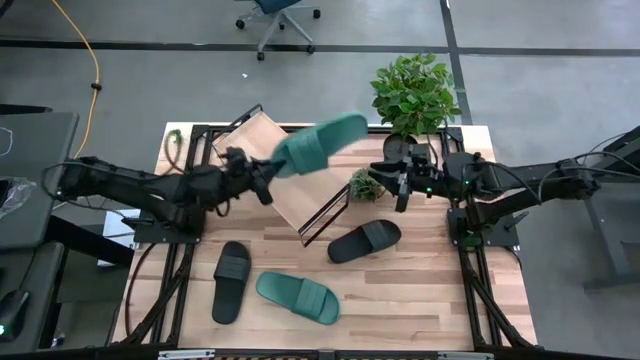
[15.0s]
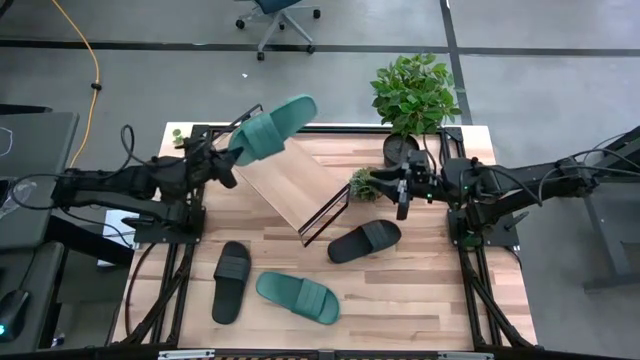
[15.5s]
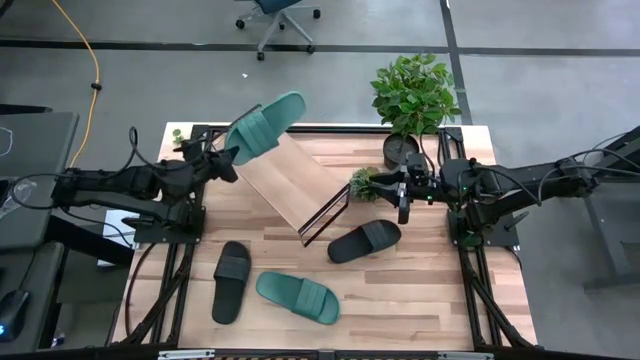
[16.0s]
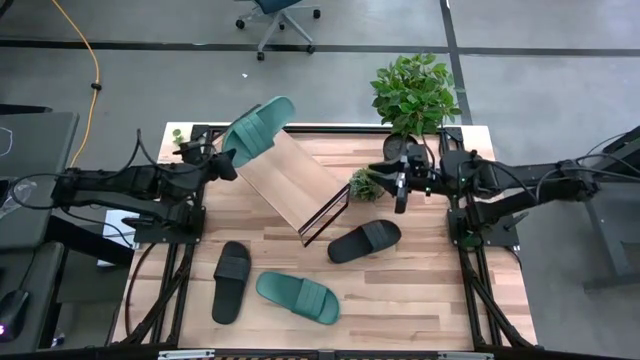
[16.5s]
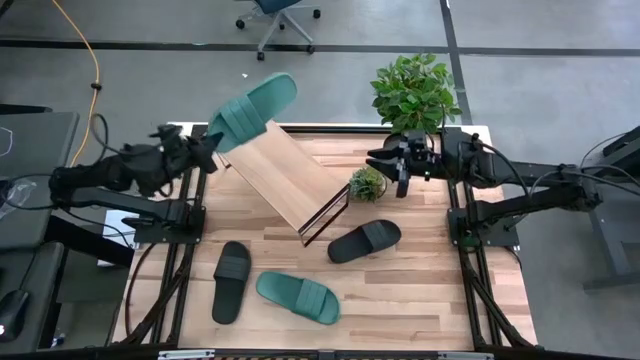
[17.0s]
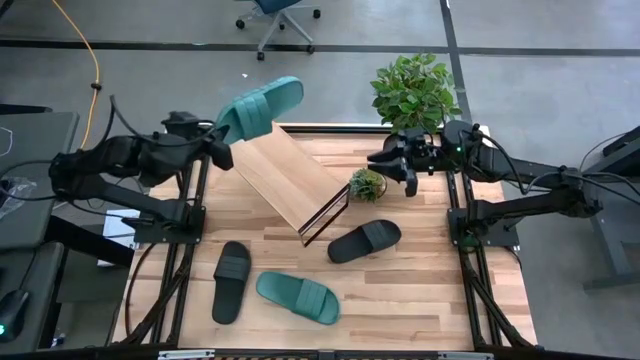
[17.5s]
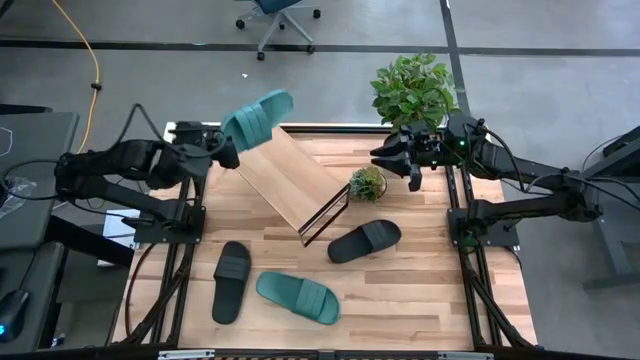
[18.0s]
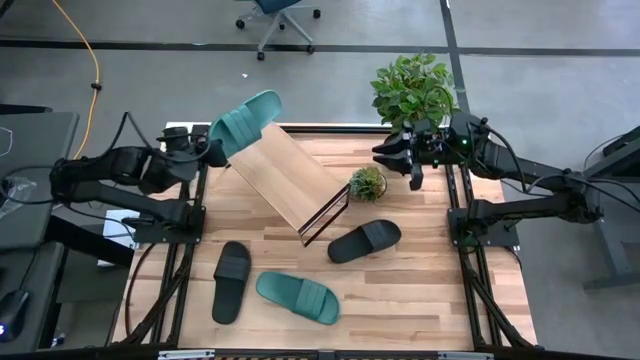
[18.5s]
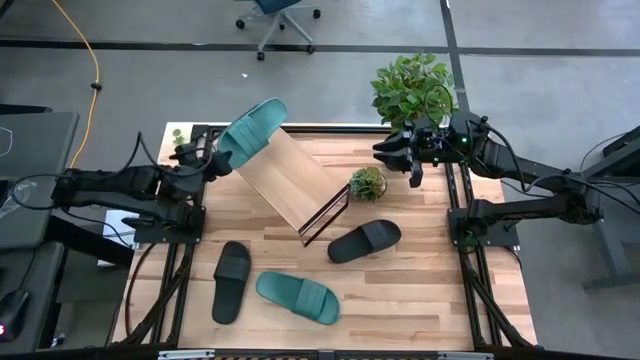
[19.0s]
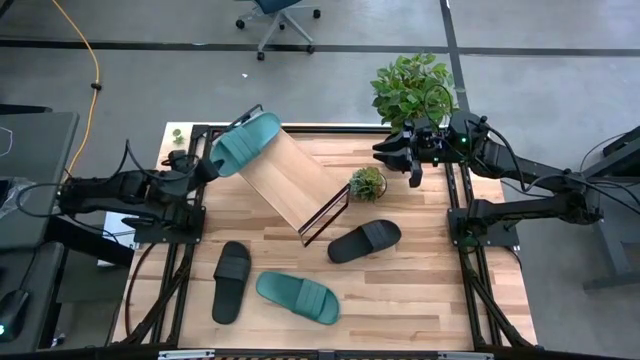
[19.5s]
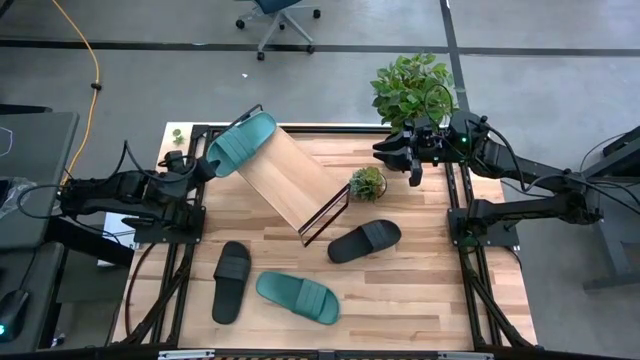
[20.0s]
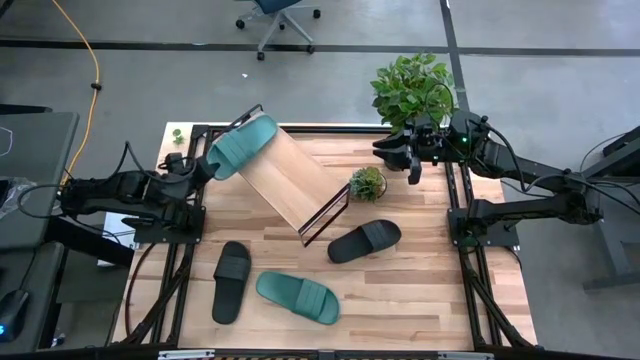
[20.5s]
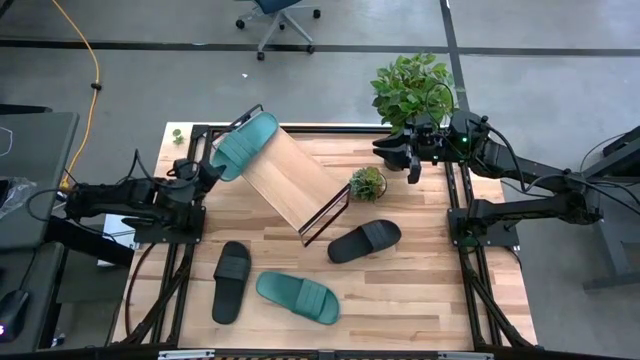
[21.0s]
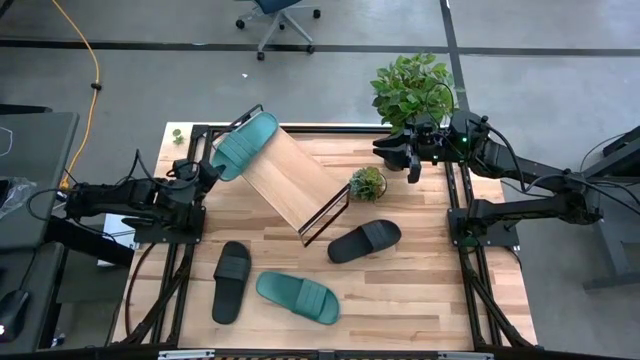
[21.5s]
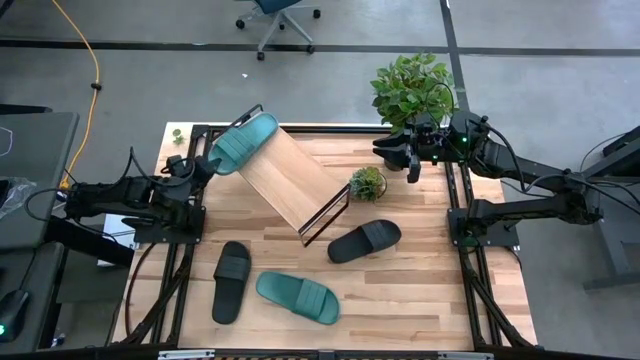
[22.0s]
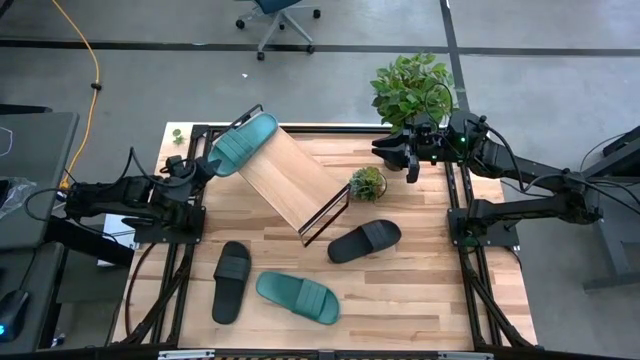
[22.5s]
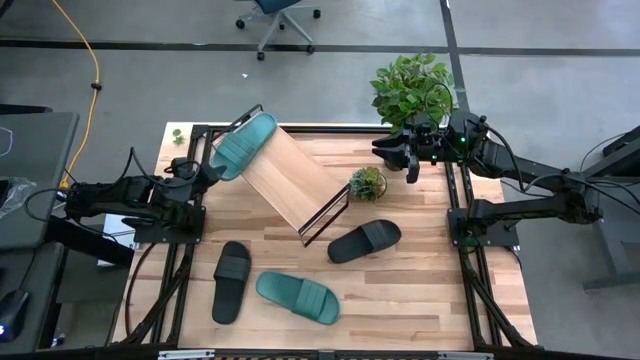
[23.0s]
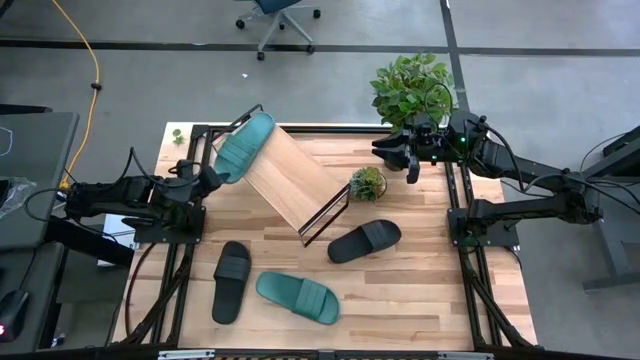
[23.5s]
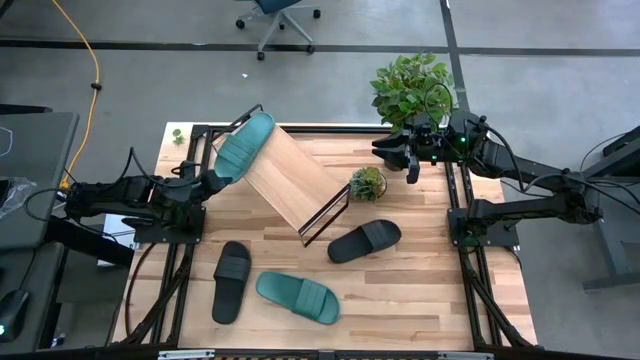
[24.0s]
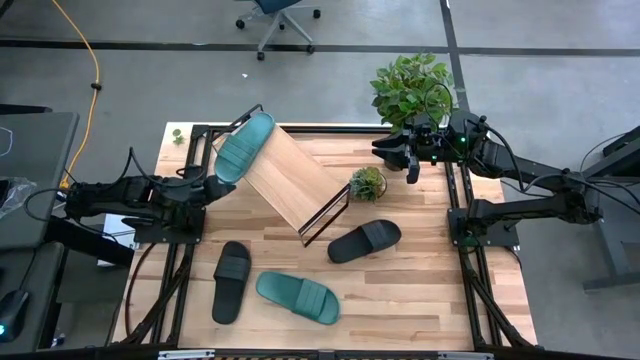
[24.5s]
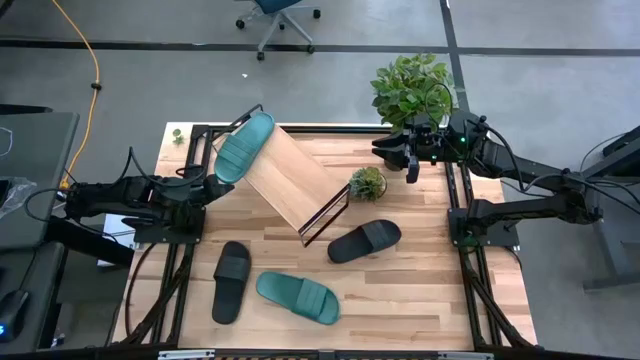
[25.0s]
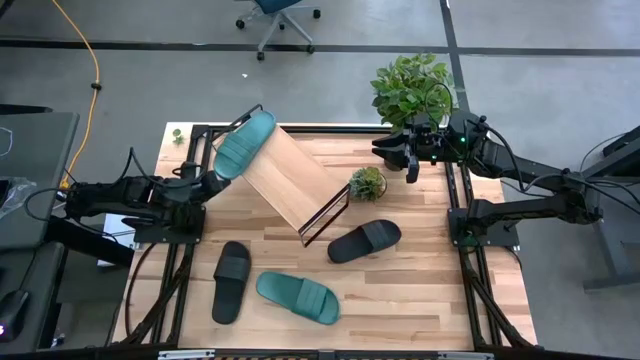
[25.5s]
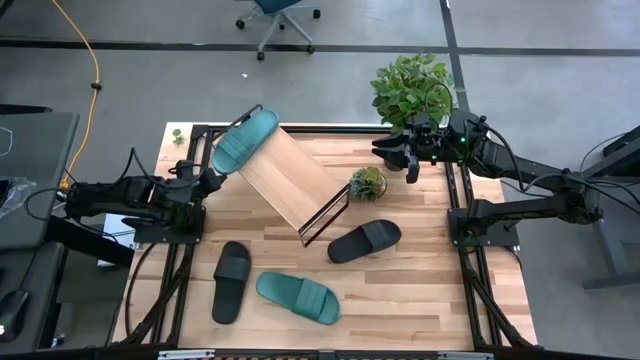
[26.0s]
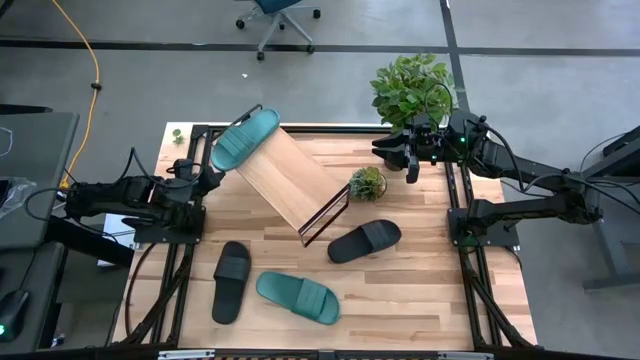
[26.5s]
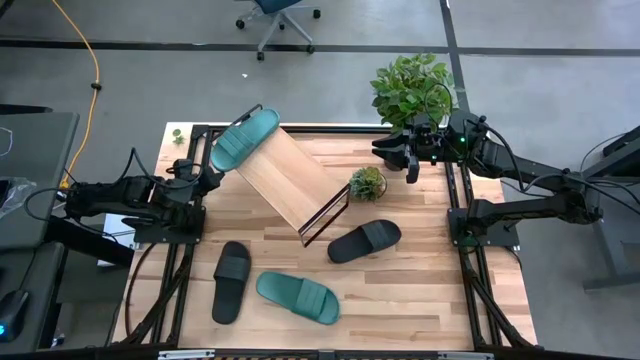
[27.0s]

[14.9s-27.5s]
Task: Pick and place slippers onto the shelf
Put the right green pair of slippers on the shelf

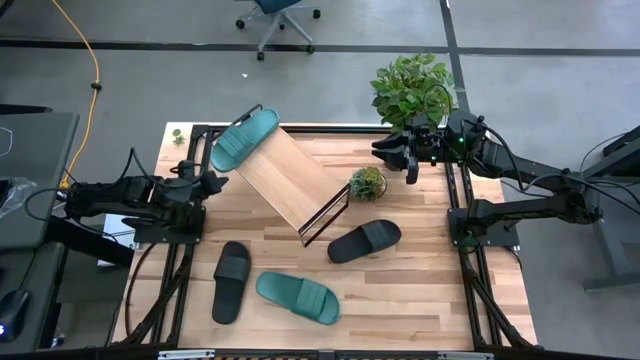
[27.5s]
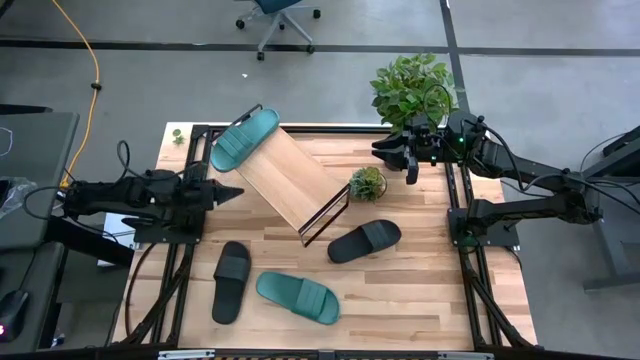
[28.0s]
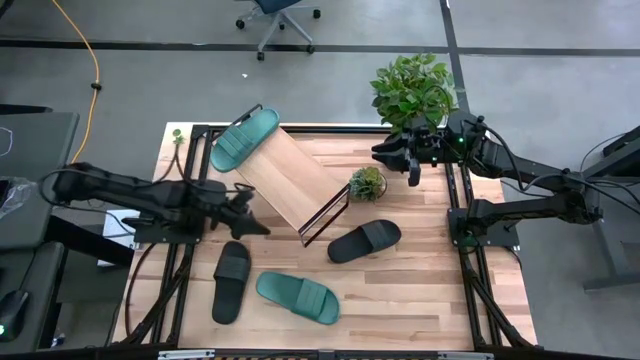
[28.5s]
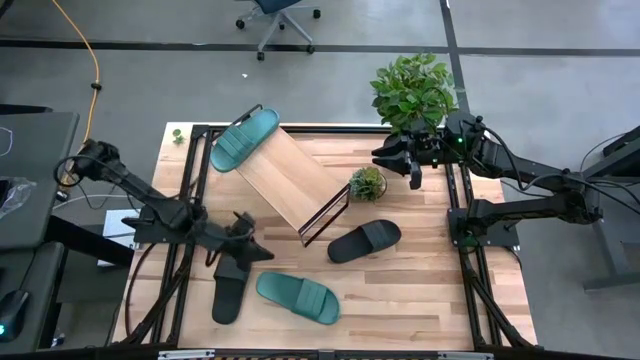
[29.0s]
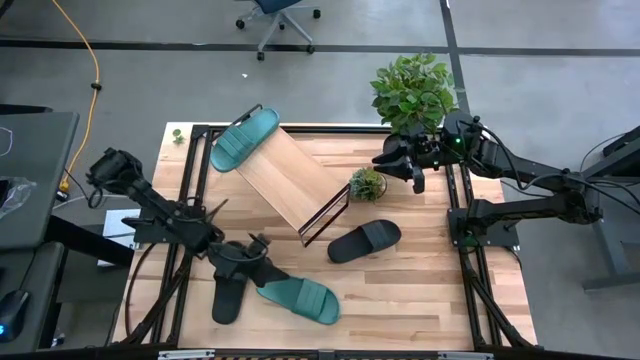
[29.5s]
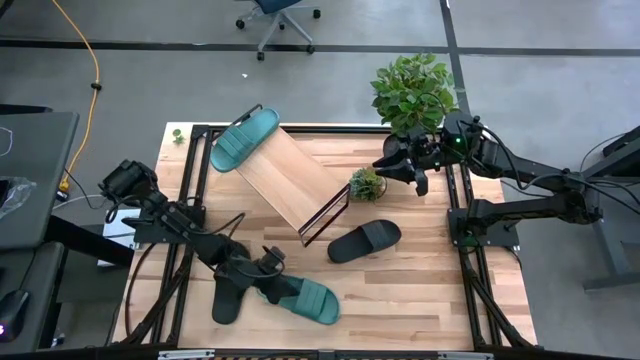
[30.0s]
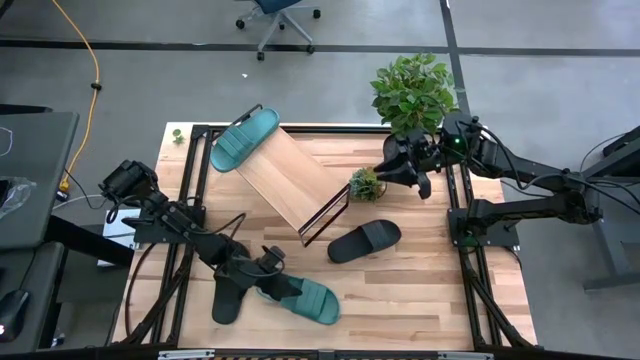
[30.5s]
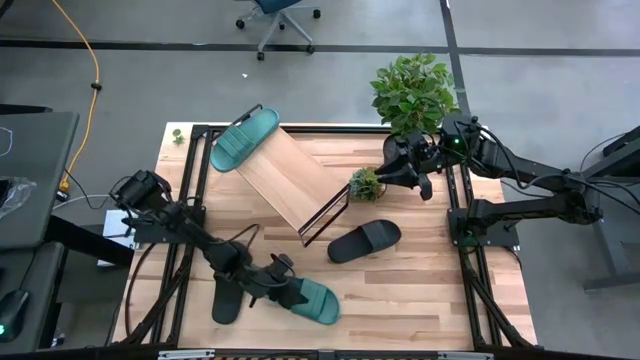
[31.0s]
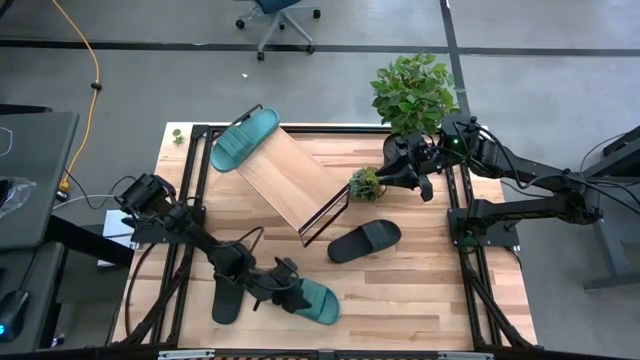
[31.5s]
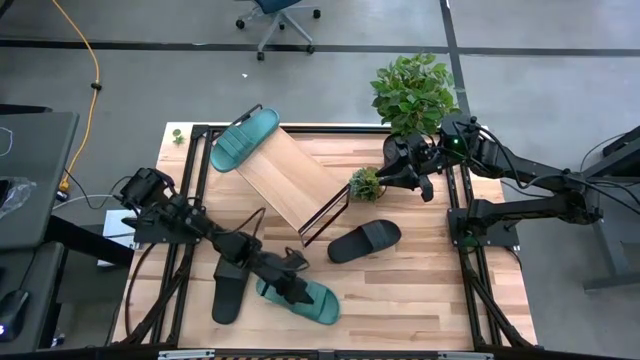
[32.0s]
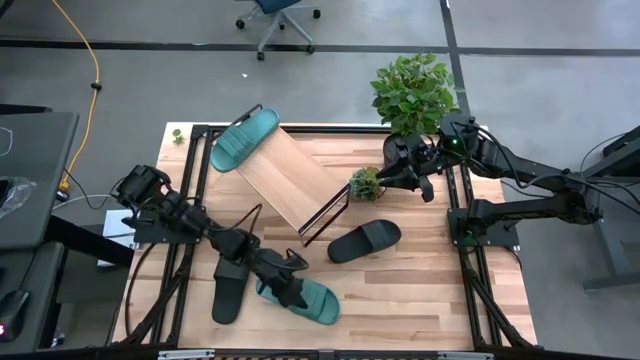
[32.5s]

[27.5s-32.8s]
Put the green pair of slippers on the shelf

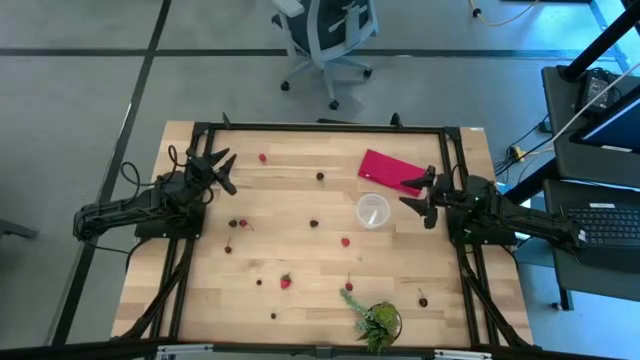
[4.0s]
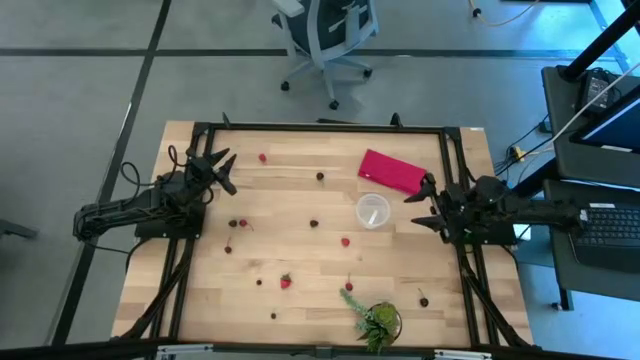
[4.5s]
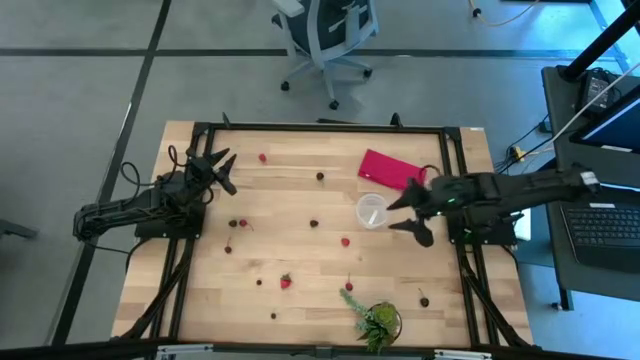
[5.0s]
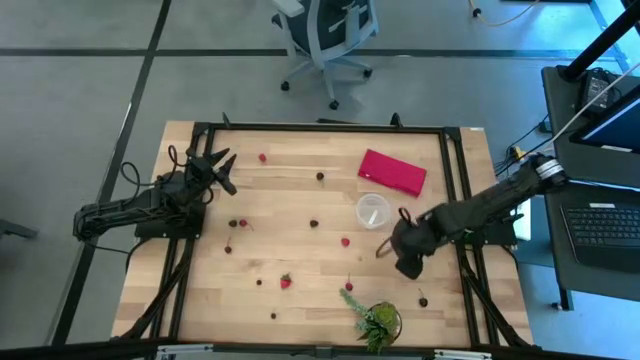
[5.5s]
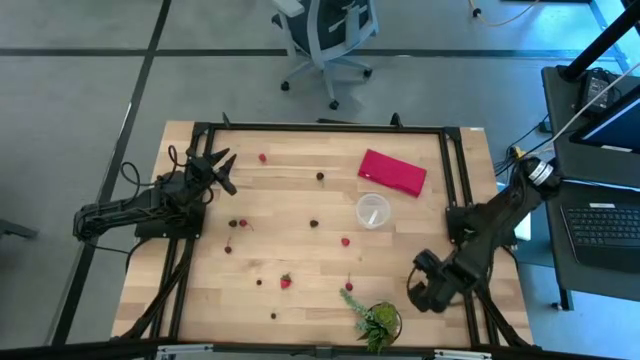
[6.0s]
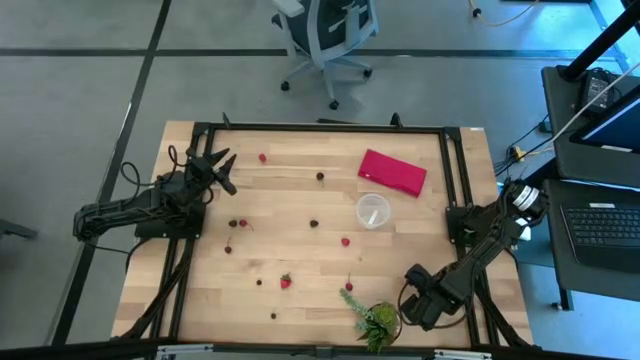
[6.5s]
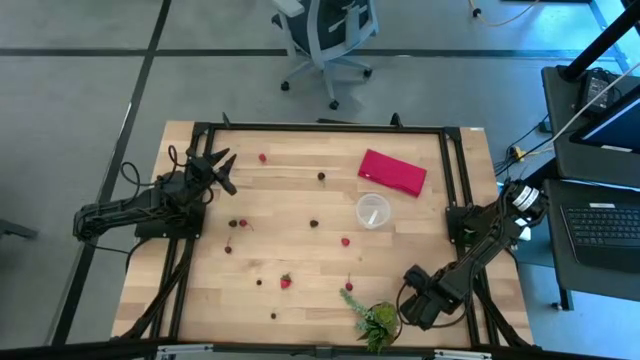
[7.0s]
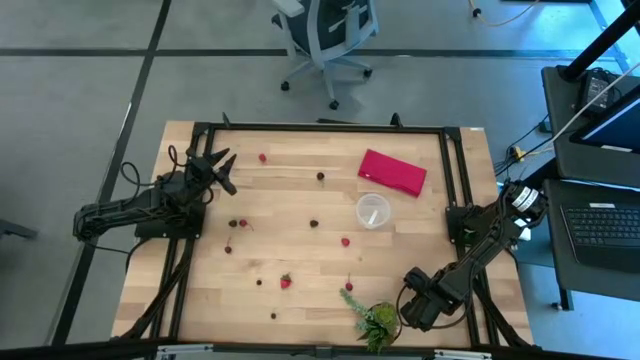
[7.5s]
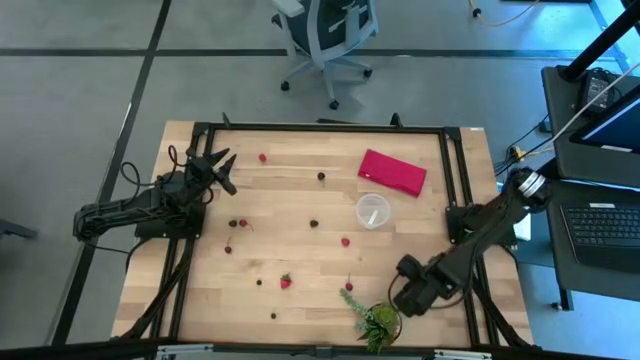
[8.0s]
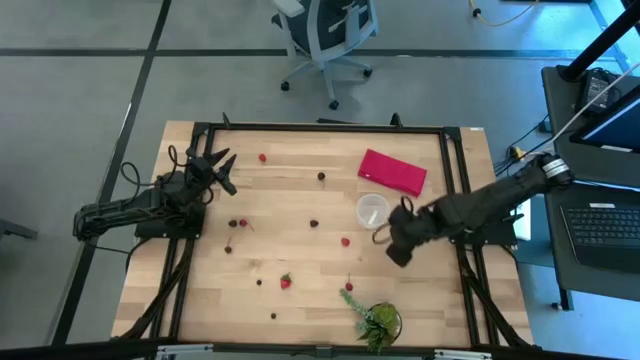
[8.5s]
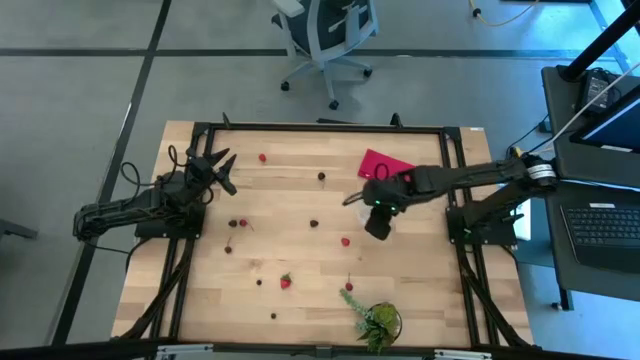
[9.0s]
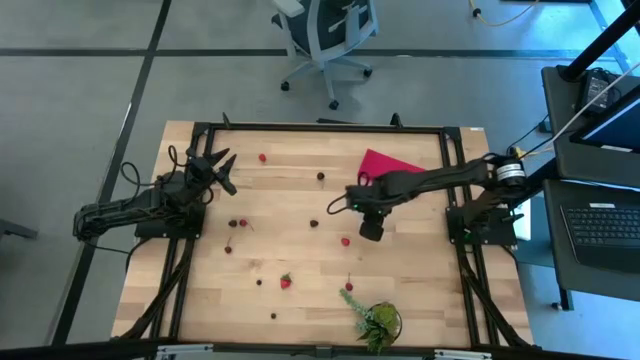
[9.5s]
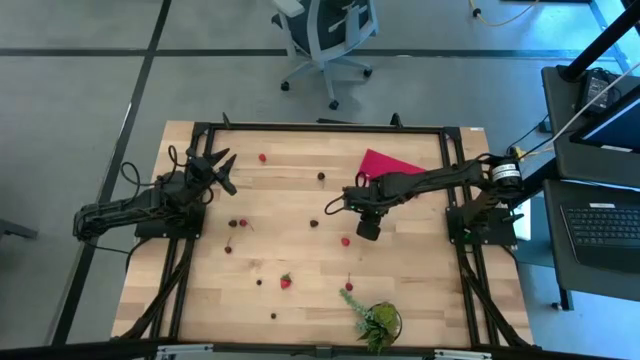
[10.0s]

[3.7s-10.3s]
Task: Pick and placing Produce into tupperware
Put the bottom black cherry into the transparent container
